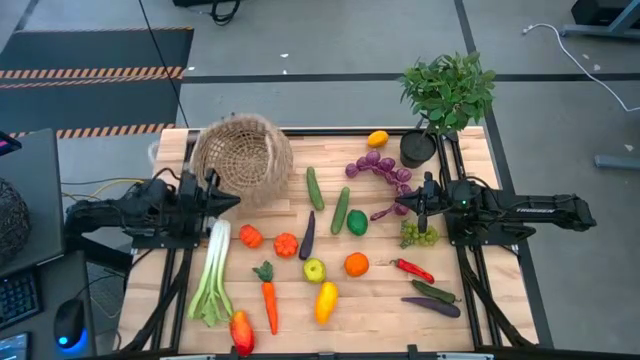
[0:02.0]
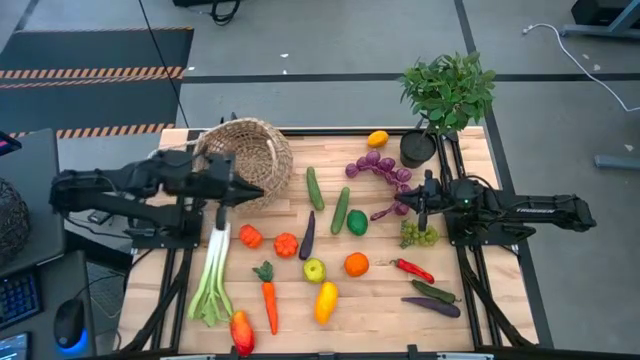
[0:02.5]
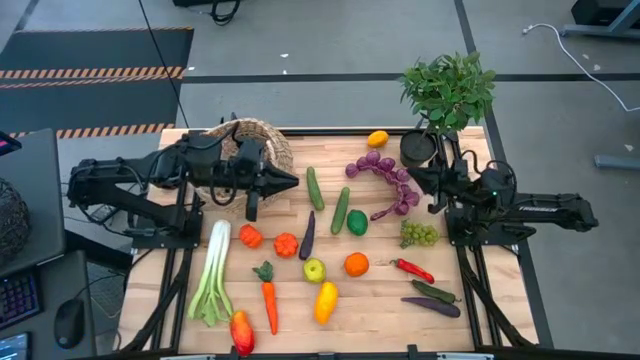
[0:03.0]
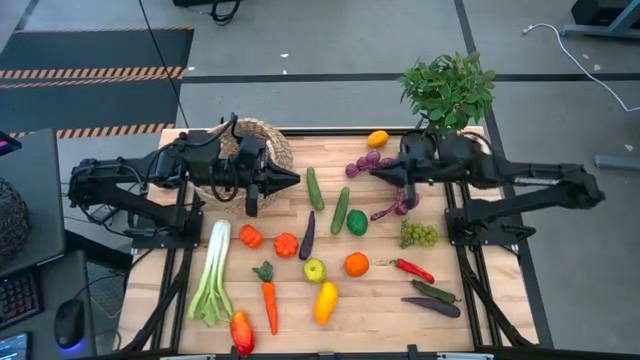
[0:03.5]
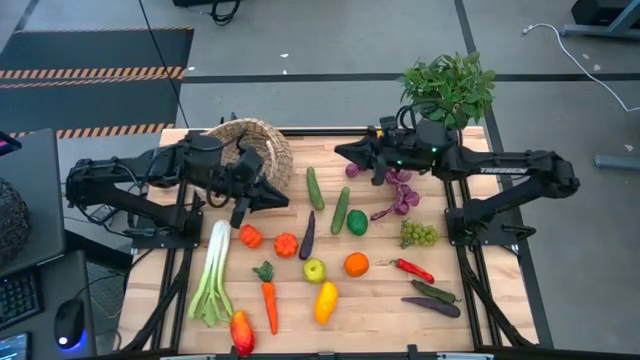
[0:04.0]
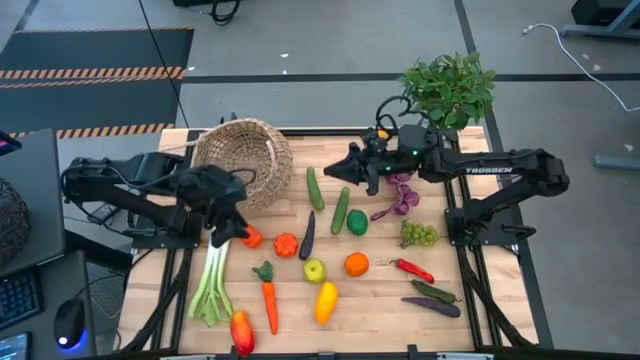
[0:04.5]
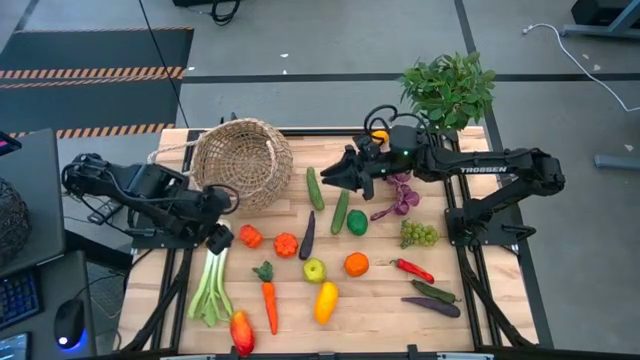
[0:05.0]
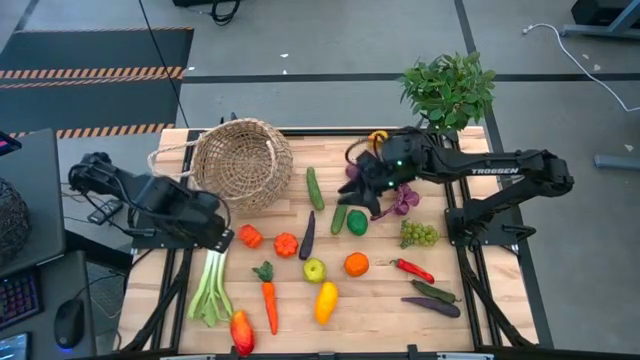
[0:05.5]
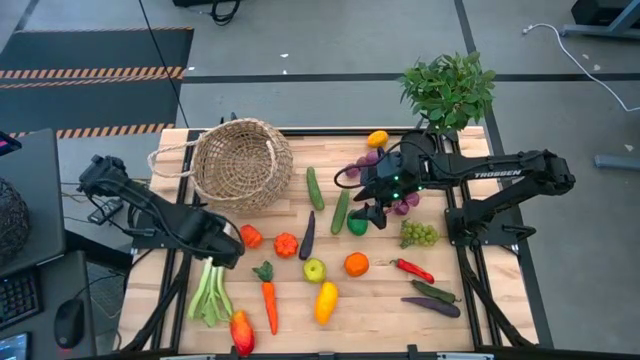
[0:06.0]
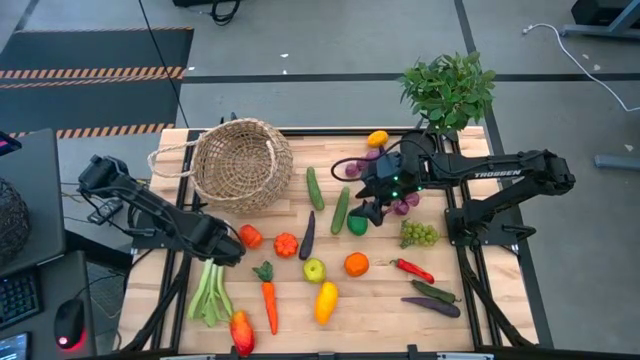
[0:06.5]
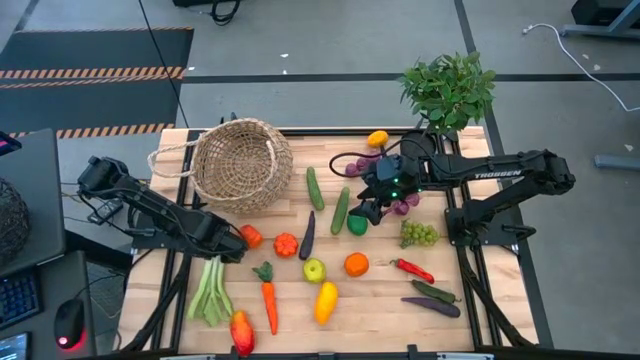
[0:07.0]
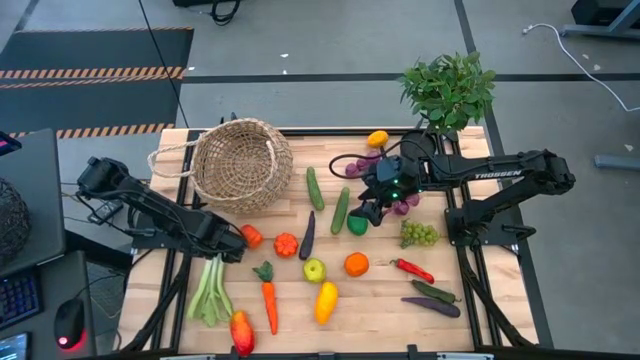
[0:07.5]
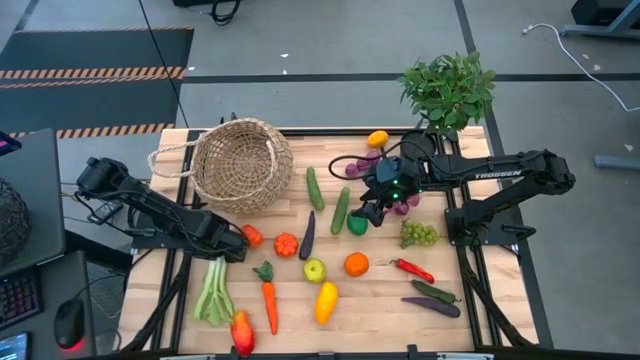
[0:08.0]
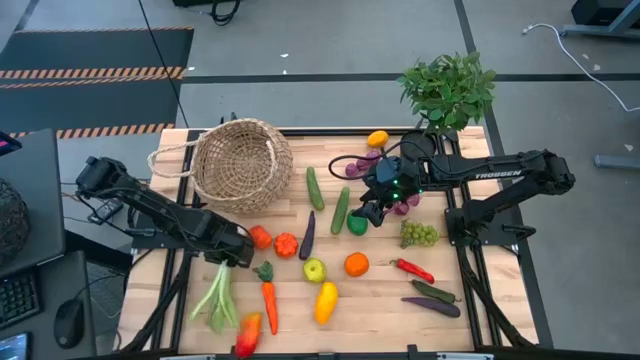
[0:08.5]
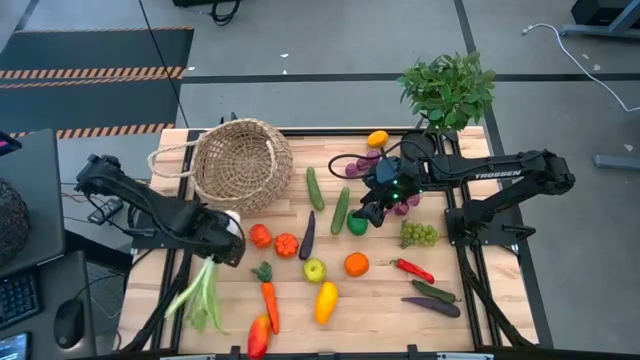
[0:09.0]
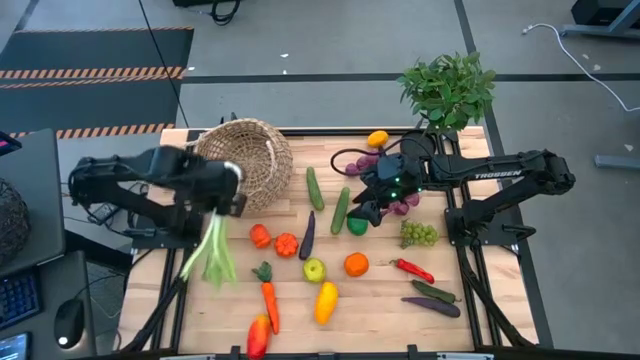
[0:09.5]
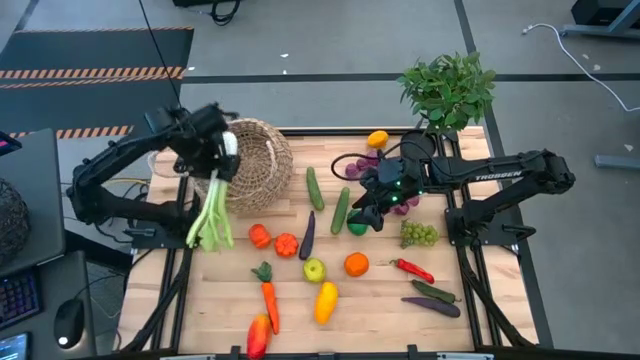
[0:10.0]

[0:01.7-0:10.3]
Task: Build produce basket
Put the green celery into the brown basket

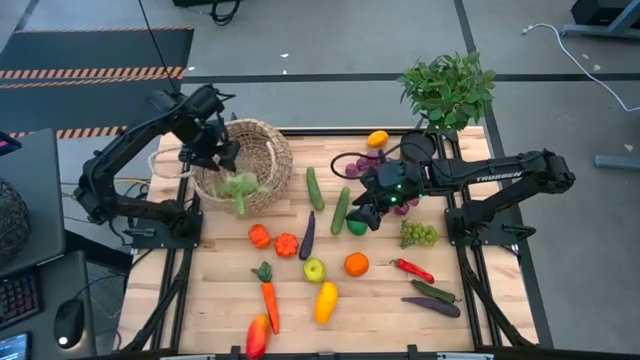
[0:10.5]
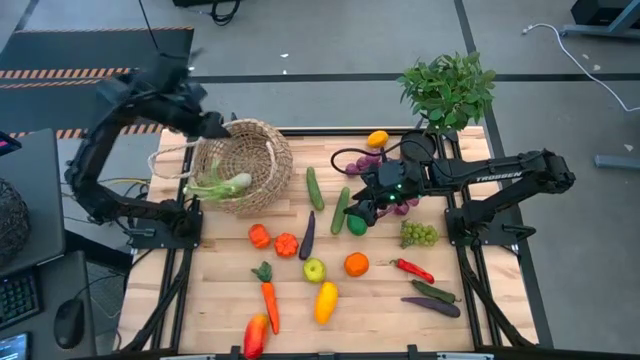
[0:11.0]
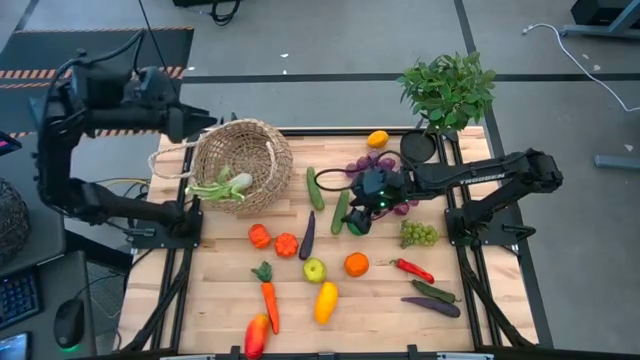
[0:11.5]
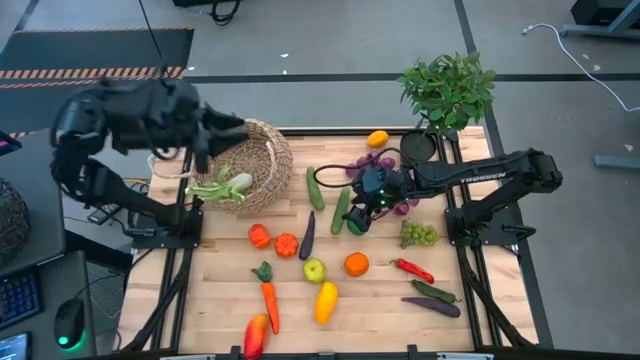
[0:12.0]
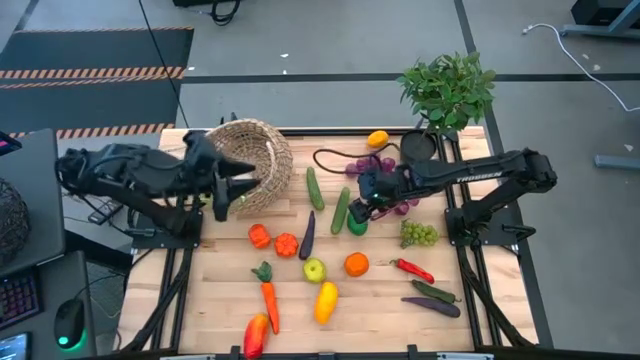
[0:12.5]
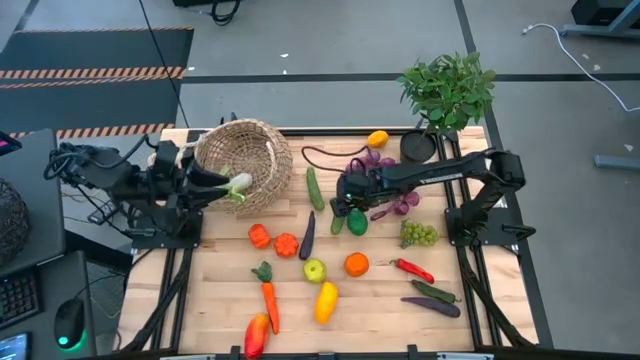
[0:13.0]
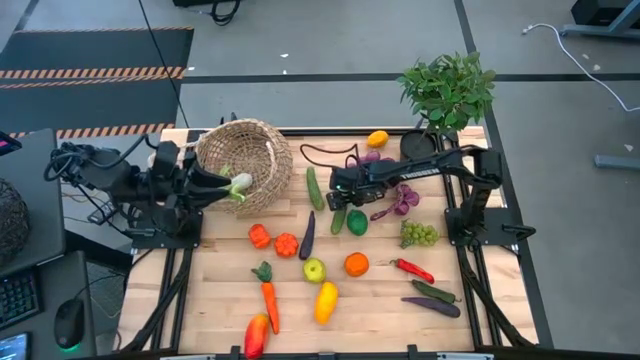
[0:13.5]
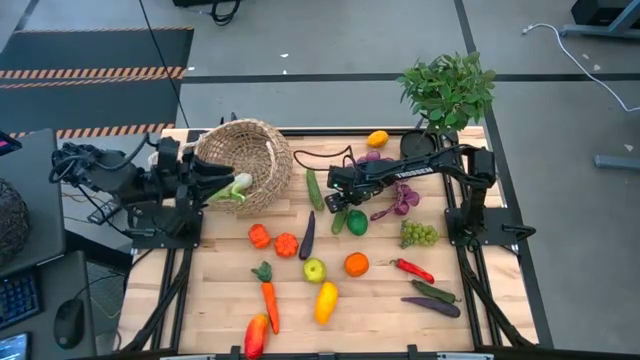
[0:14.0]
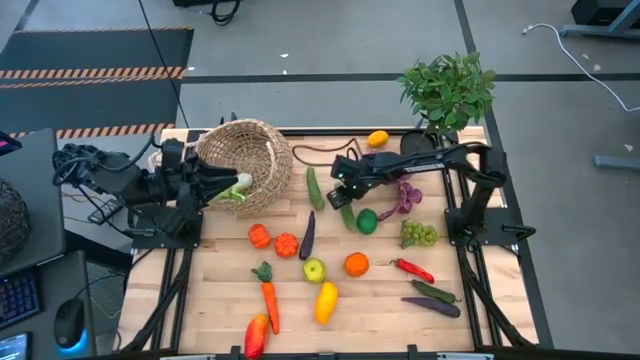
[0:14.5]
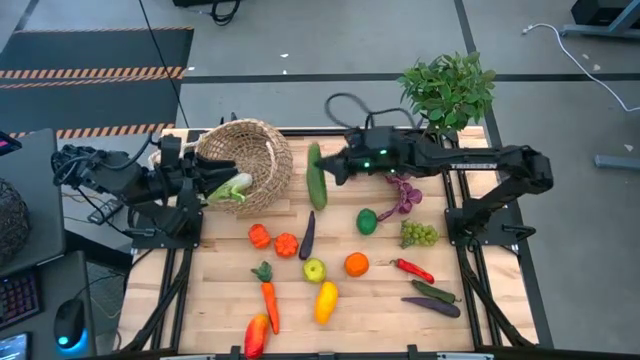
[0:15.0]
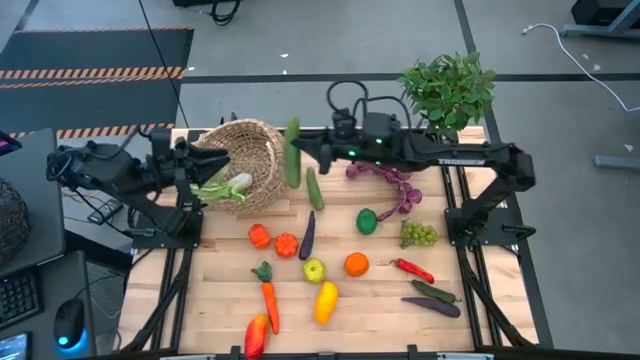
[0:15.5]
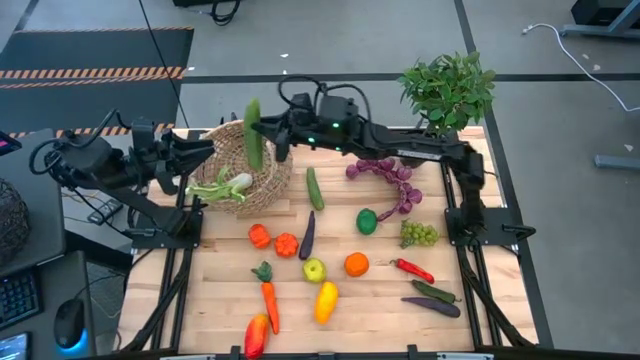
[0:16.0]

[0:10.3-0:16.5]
Put the right green cucumber into the brown basket

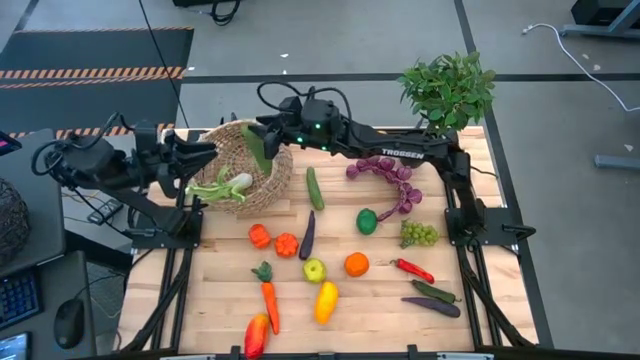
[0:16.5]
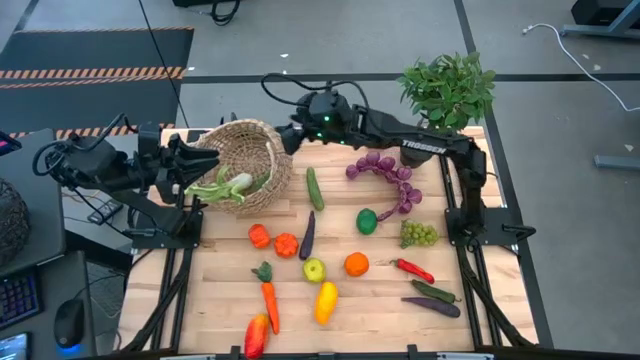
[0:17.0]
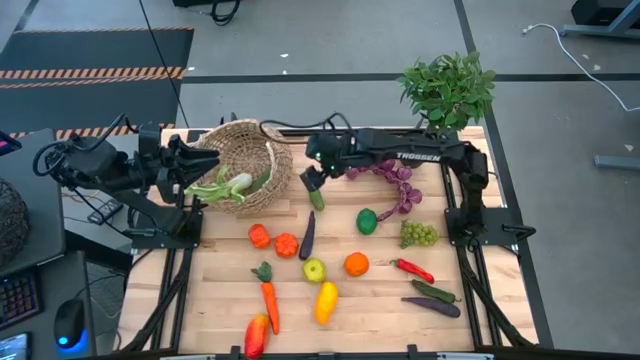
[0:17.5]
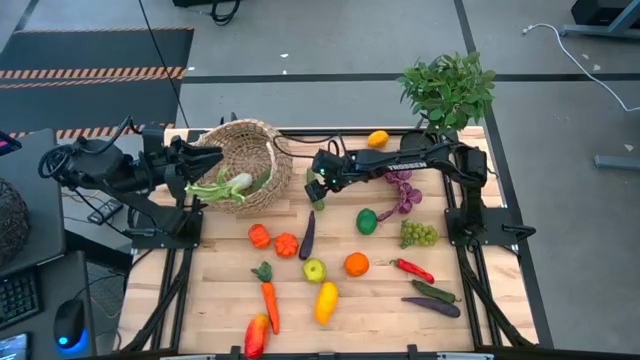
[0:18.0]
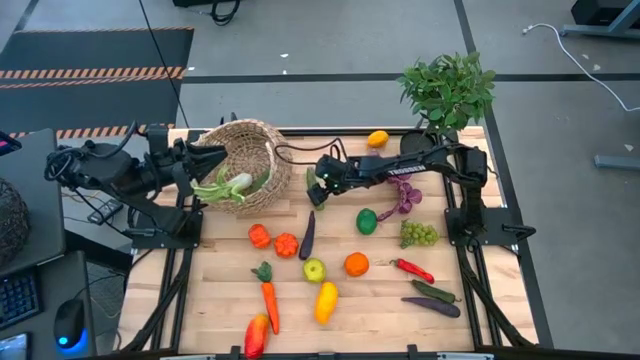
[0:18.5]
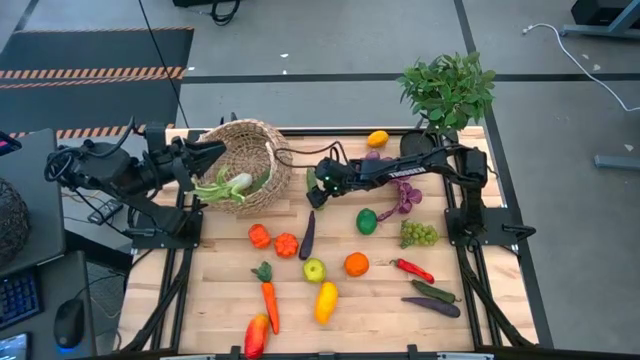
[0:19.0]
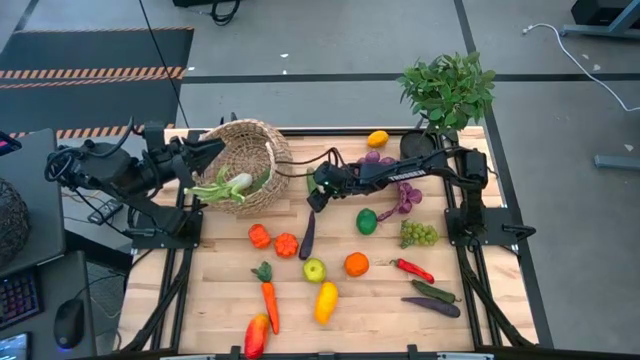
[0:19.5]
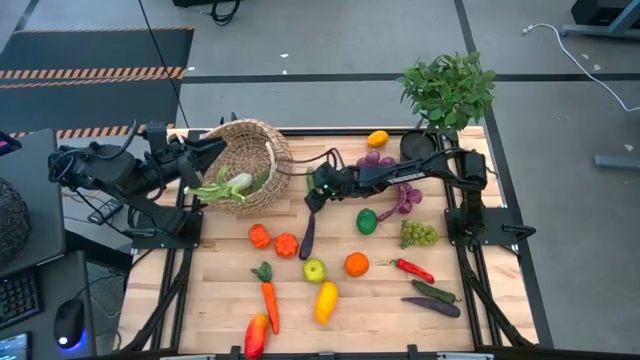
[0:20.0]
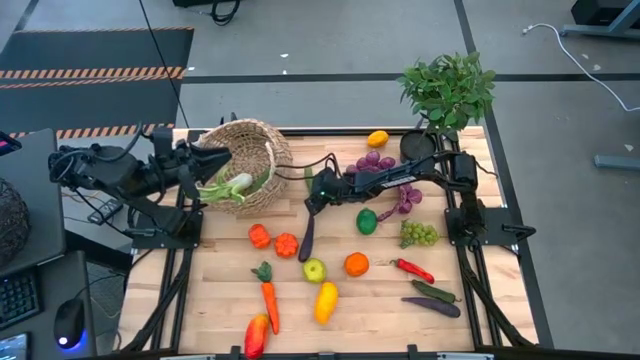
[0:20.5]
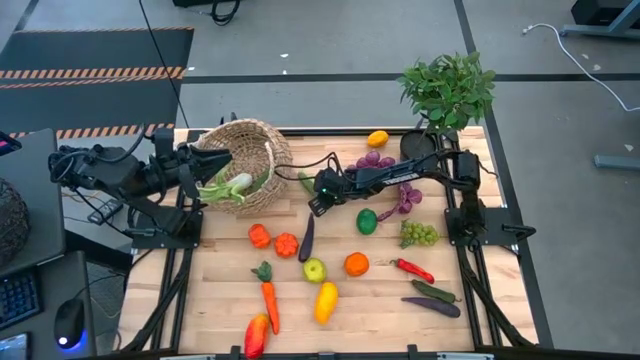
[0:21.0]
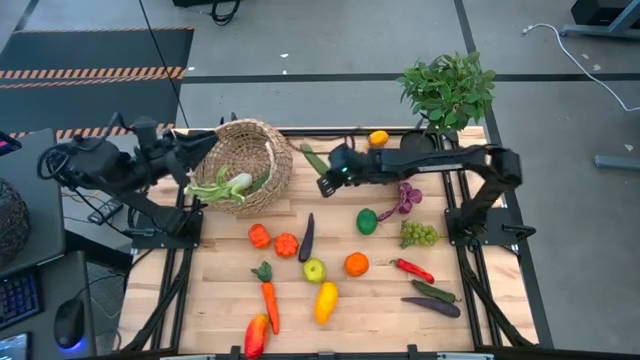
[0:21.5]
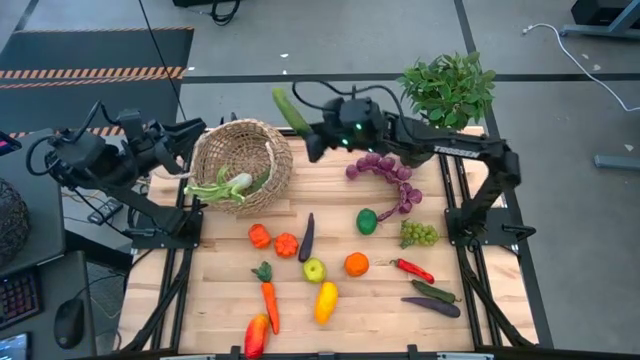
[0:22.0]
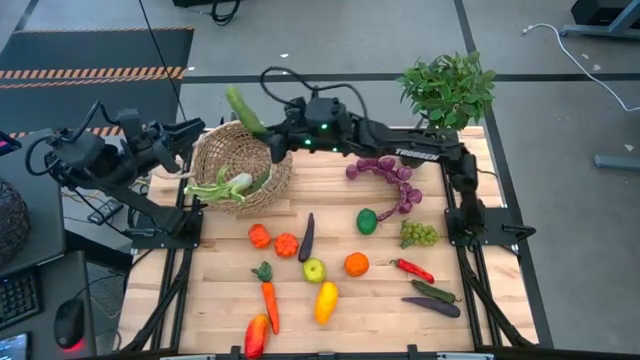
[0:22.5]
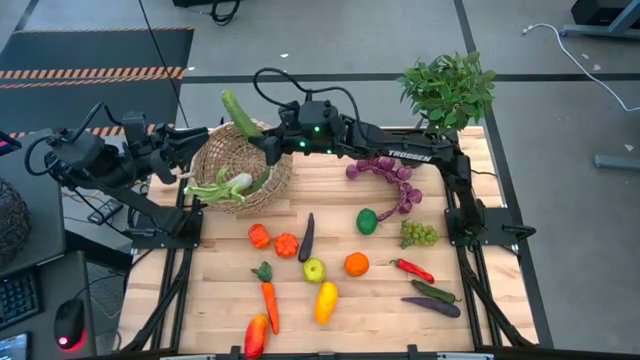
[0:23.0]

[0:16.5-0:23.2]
Put the green cucumber into the brown basket

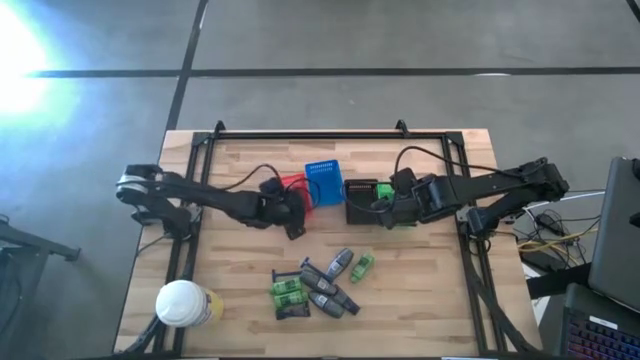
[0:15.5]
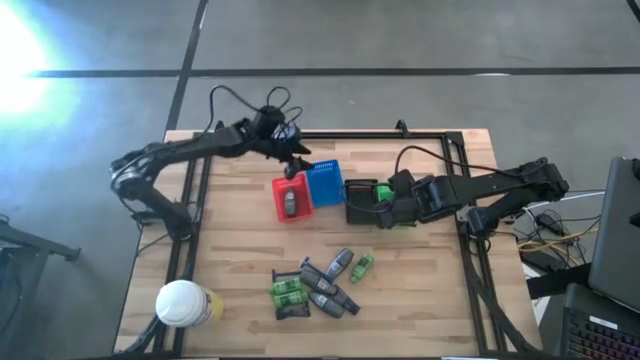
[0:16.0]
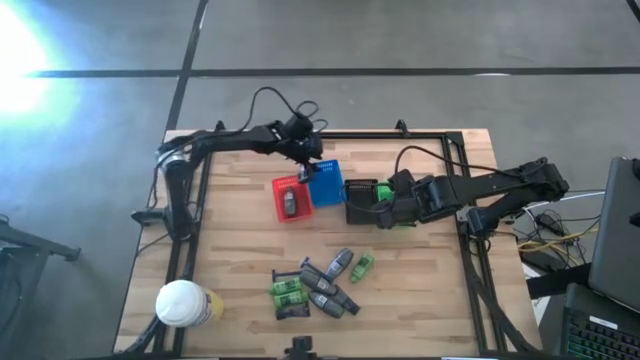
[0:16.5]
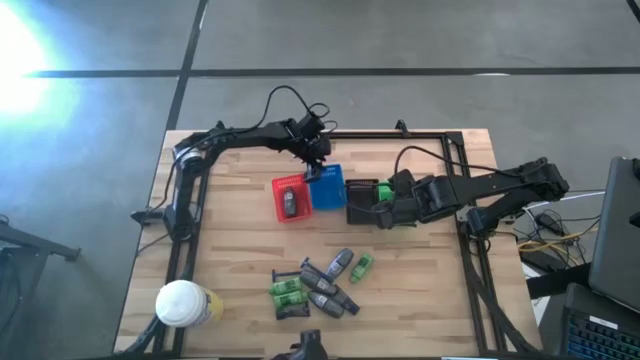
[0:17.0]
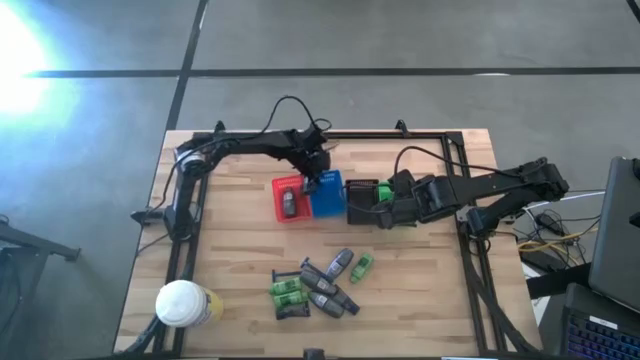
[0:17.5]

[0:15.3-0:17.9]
Task: Pick & Place Travel size toiletries
Adjust the blue bin
